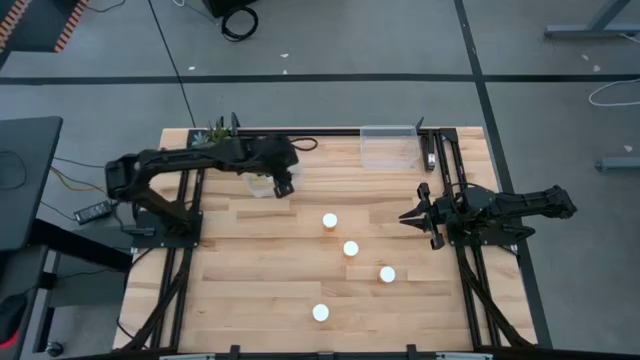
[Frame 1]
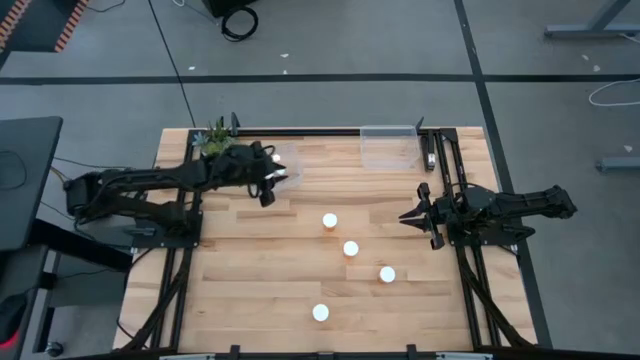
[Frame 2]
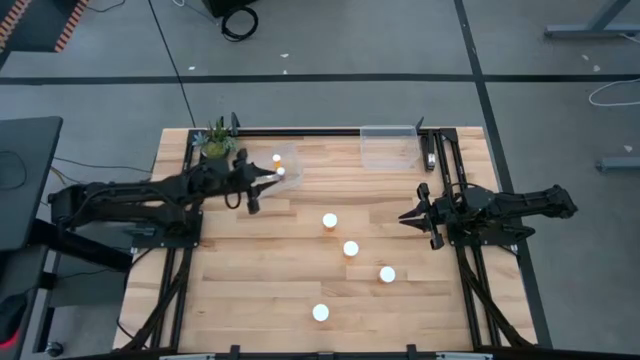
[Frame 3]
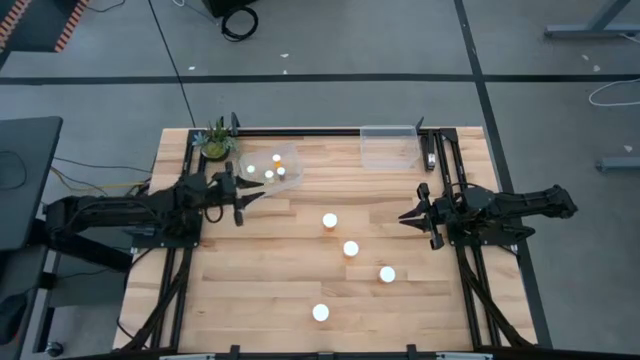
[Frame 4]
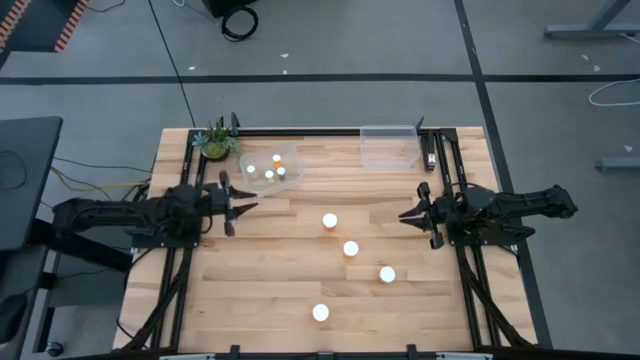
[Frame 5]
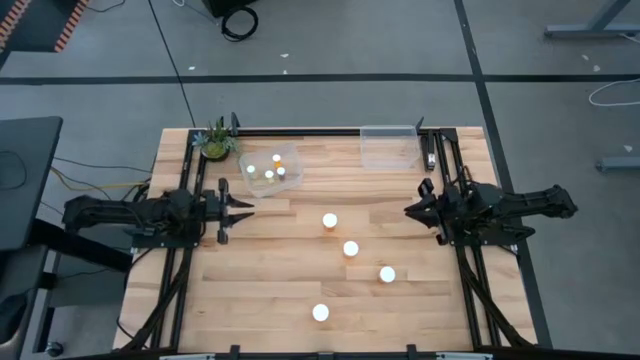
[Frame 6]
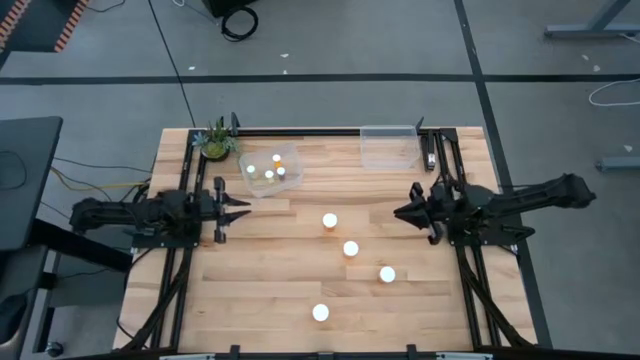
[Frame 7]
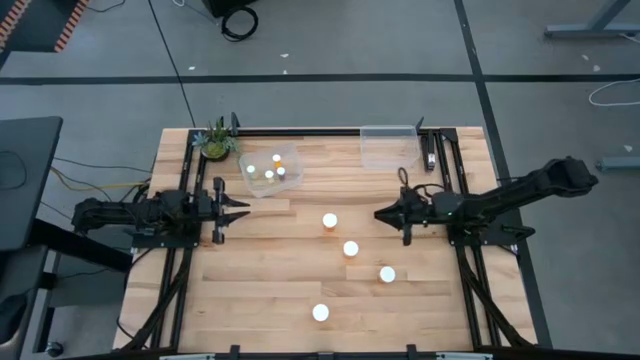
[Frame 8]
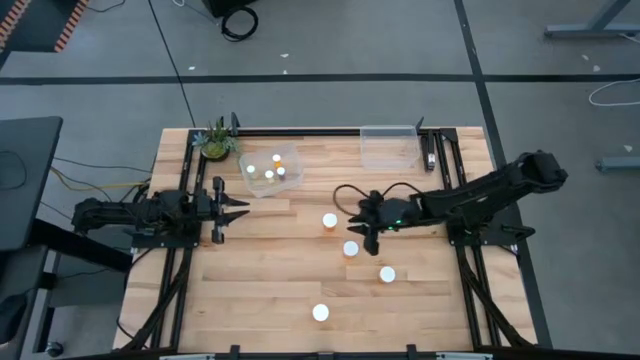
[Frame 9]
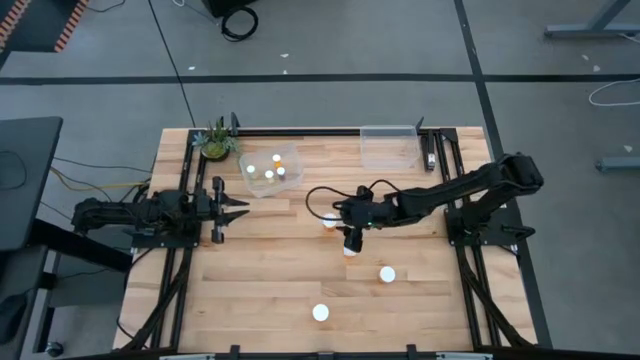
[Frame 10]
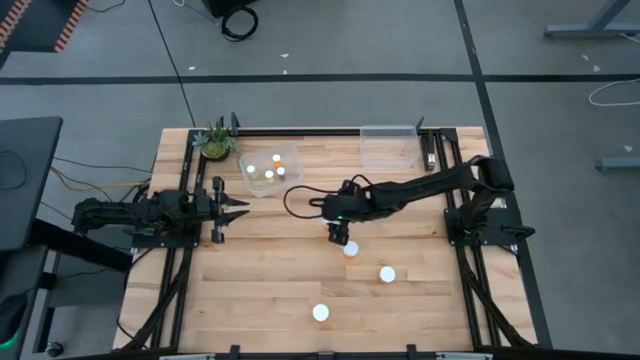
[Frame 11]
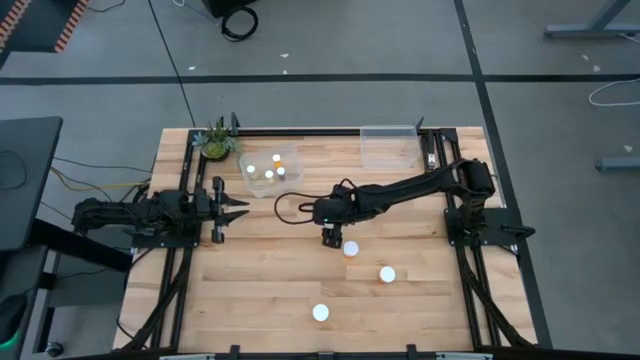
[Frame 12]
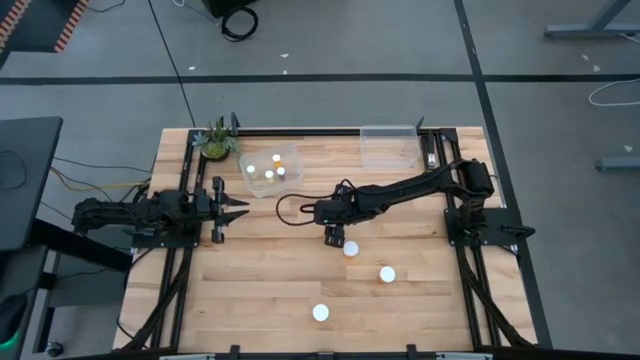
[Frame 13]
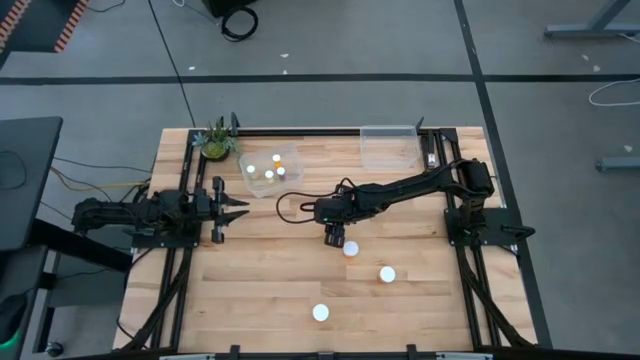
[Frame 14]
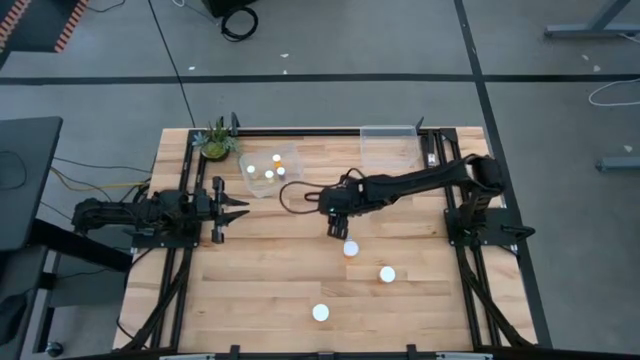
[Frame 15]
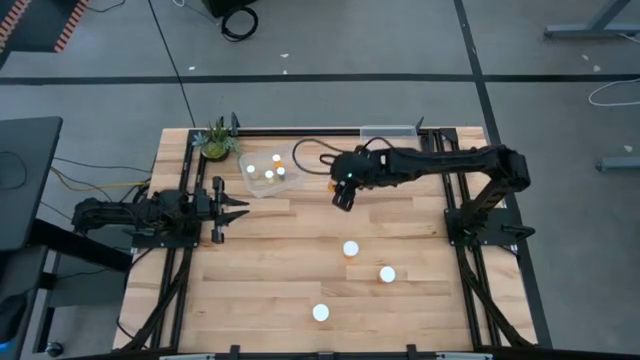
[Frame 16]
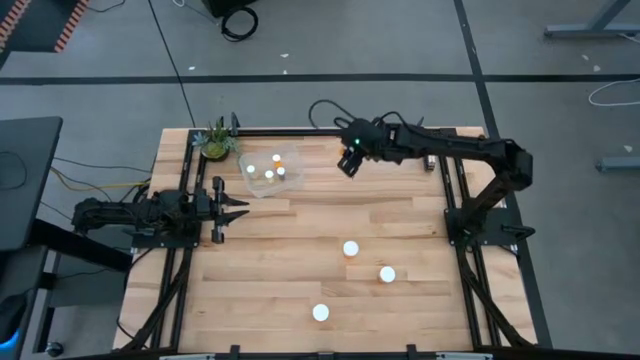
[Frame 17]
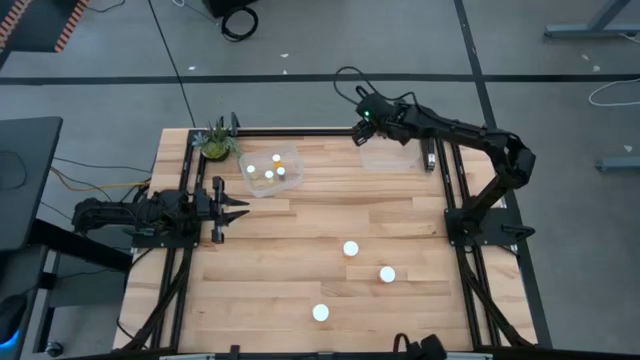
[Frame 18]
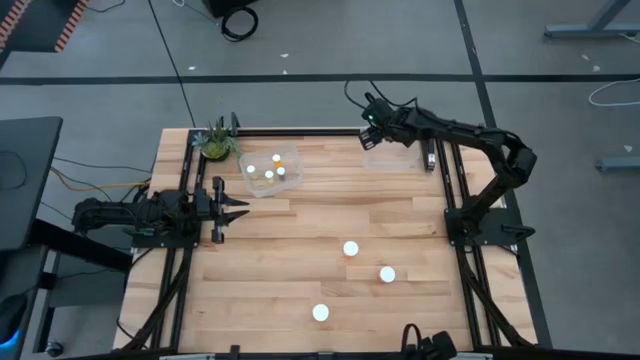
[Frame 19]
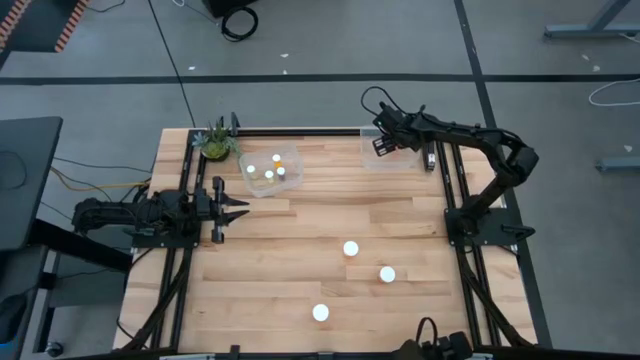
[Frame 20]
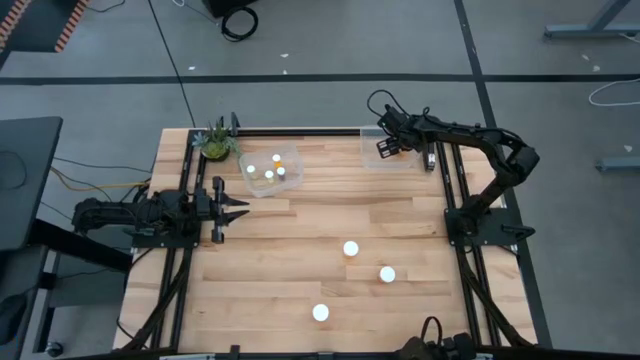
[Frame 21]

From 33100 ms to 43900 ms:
Task: Pick and place medicine bottles into bin by pill shape (circle, oval)
Put the large orange pill bottle into the right transparent bin

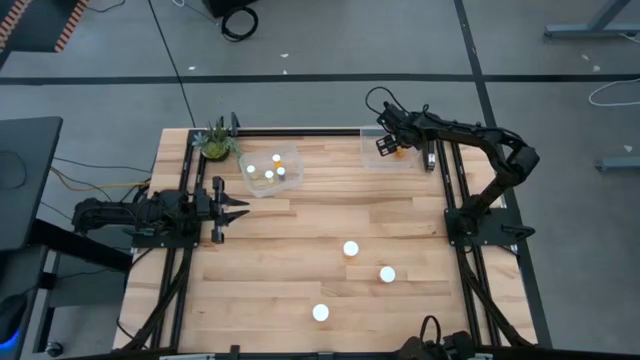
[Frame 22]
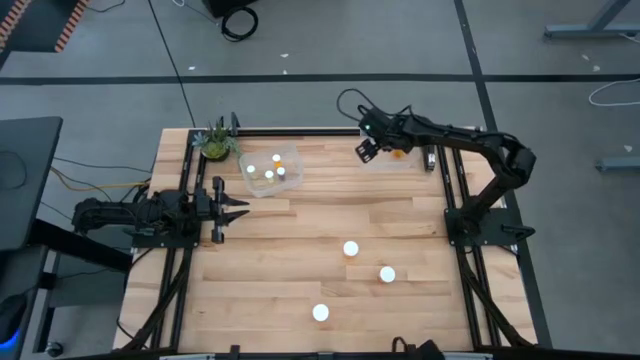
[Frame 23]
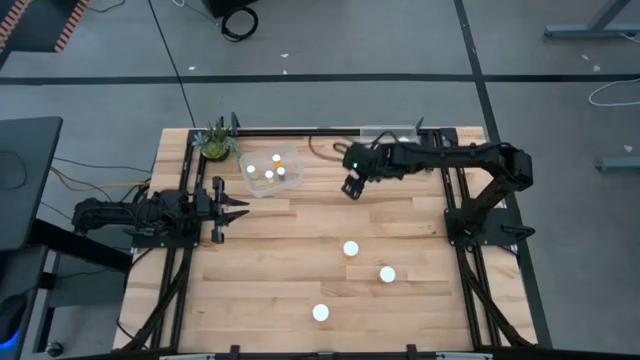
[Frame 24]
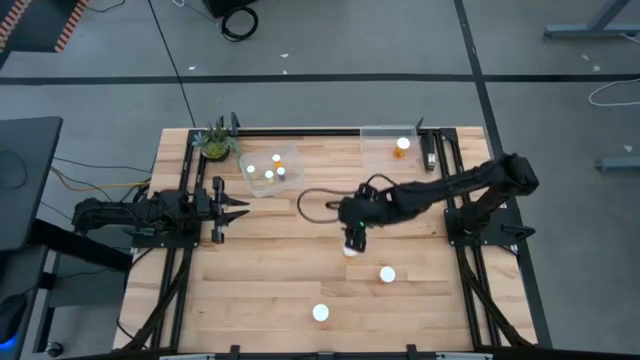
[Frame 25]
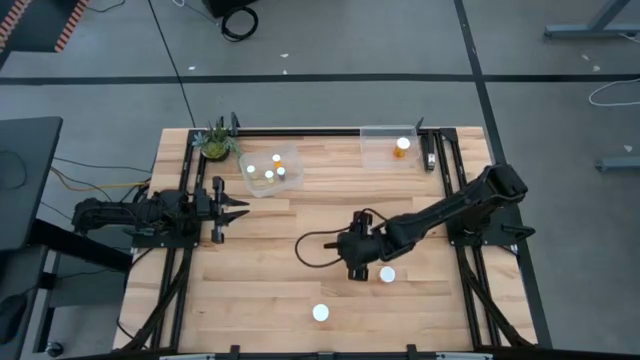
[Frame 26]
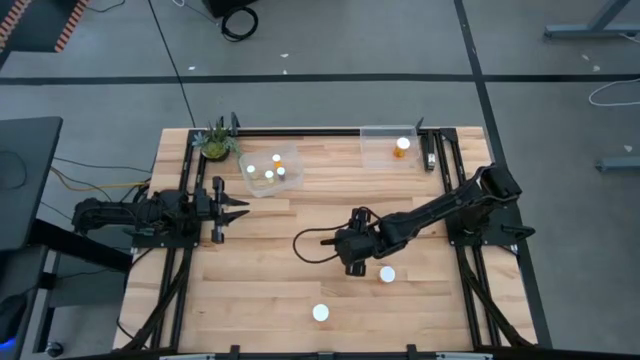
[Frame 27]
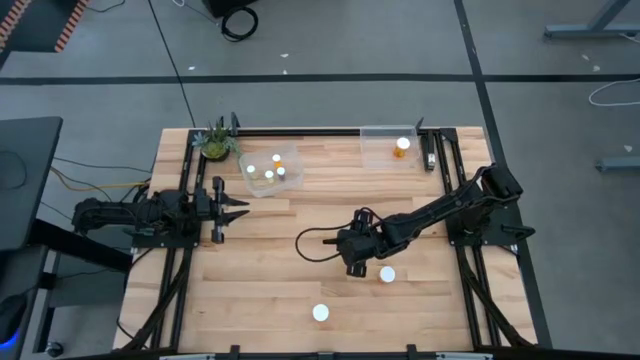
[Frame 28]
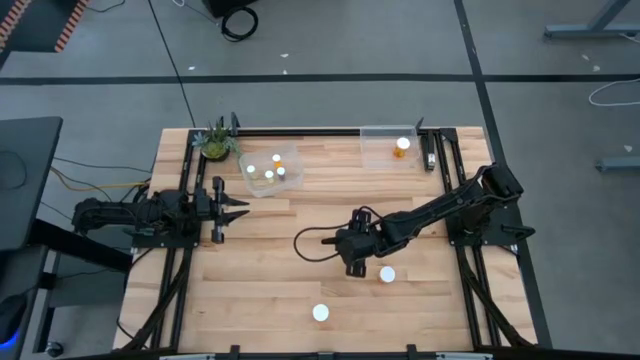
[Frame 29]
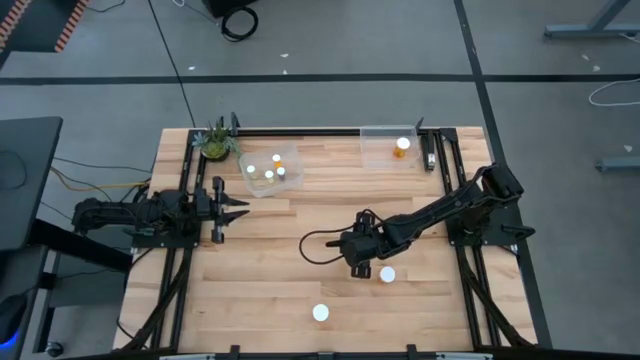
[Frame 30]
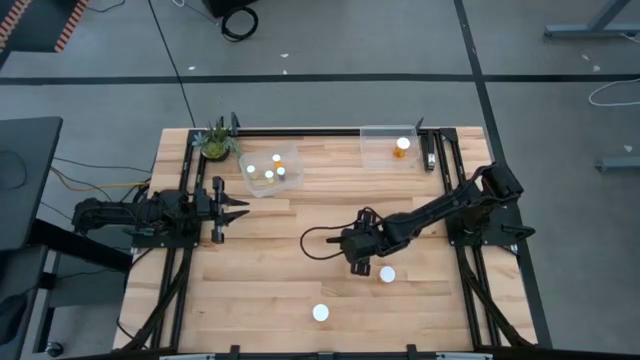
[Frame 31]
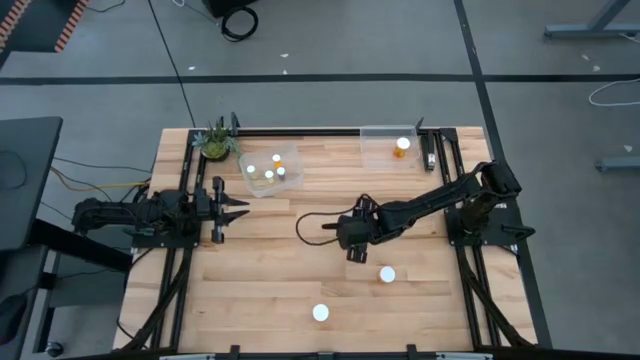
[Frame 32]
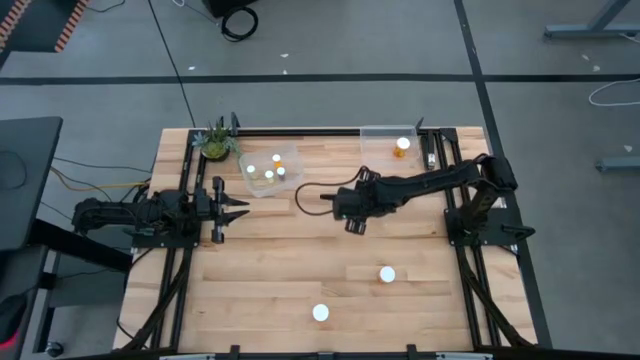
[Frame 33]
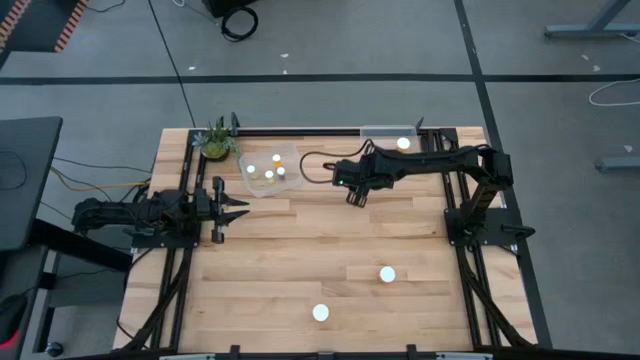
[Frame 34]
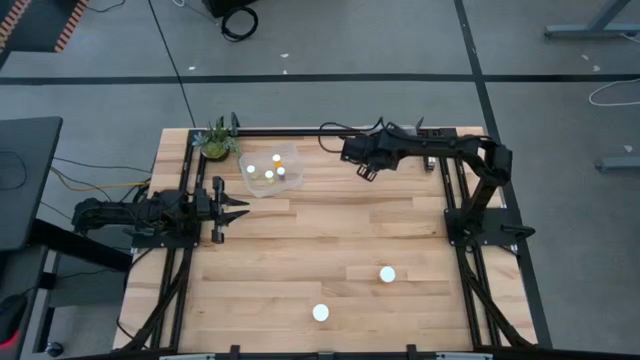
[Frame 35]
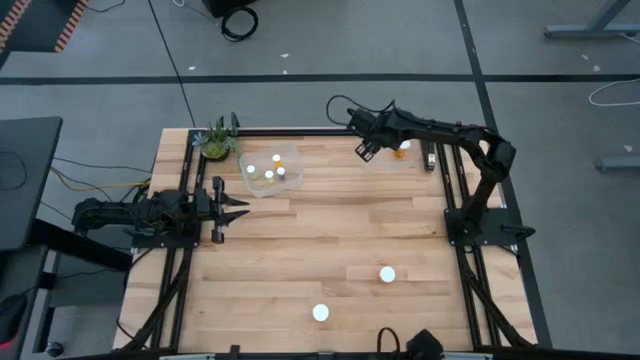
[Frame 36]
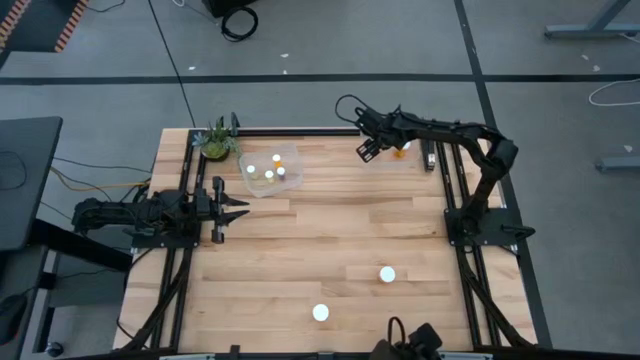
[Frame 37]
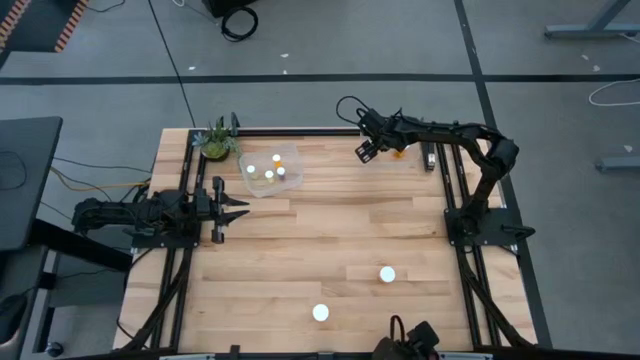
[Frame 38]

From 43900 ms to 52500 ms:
Put the large orange pill bottle into the right transparent bin

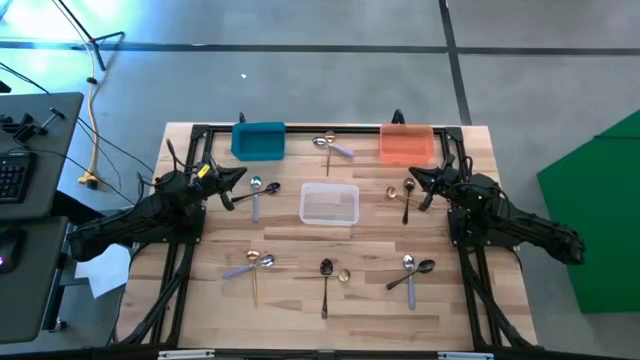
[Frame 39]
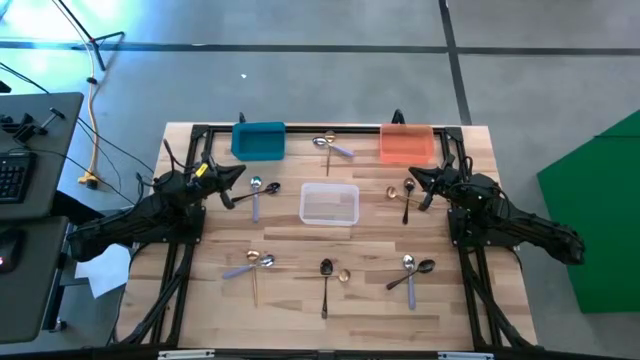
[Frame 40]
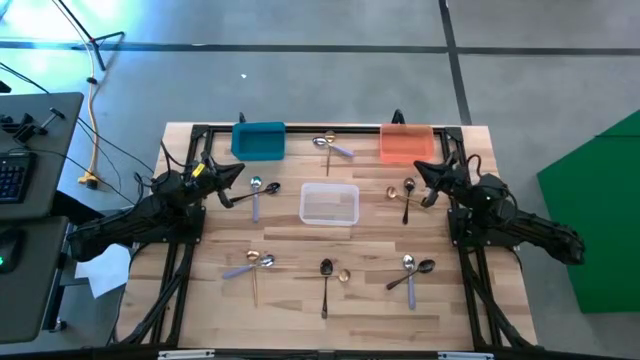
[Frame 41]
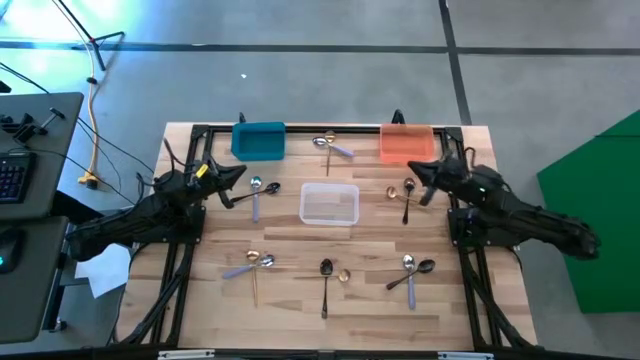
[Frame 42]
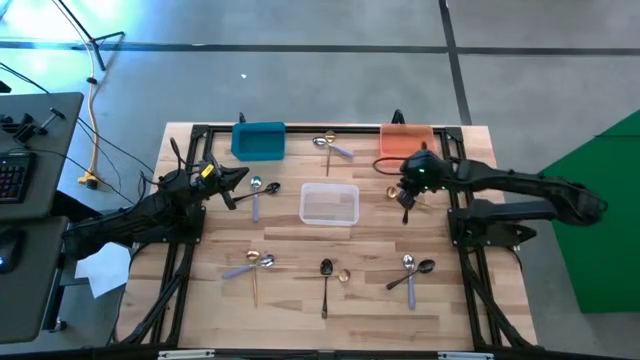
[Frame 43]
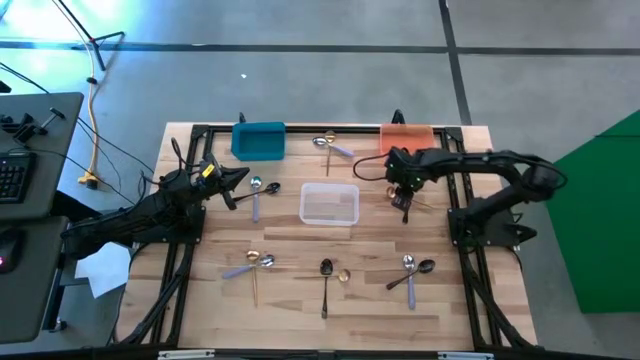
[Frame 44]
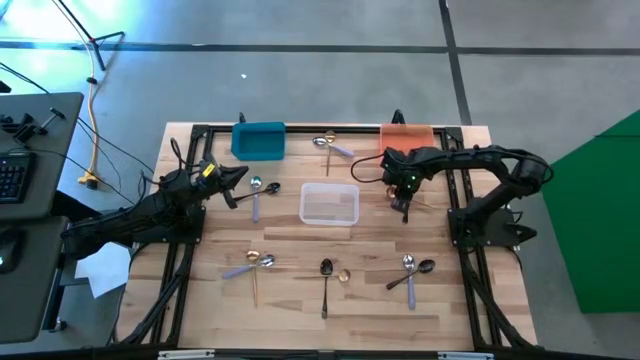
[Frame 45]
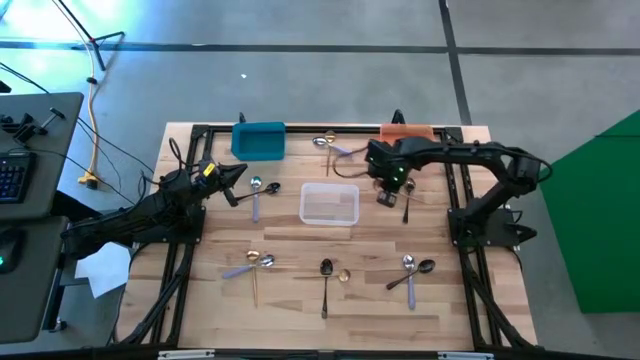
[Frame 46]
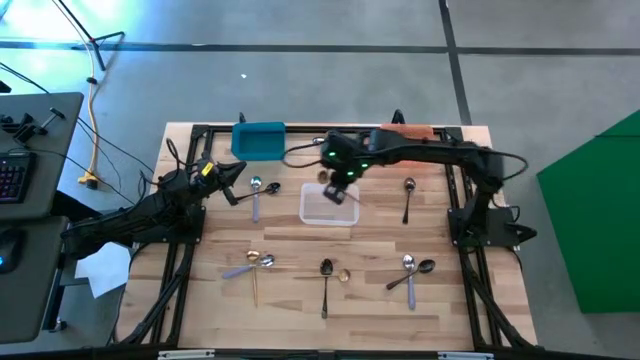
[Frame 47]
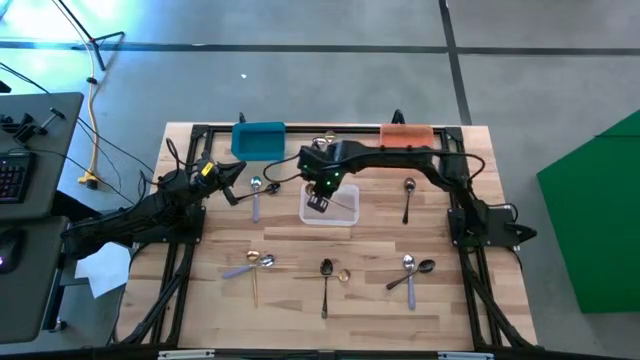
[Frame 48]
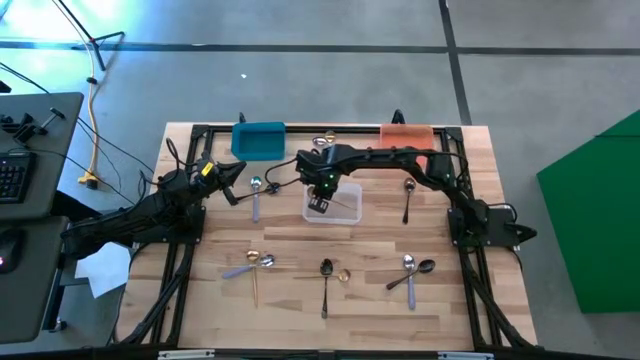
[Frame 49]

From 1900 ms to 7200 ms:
Task: Sort silverware by color (type)
Put the golden spoon into the white bin
